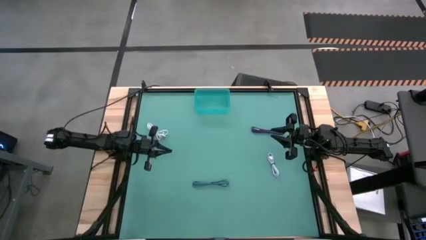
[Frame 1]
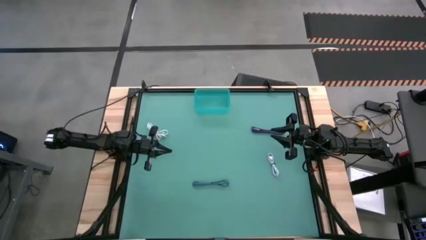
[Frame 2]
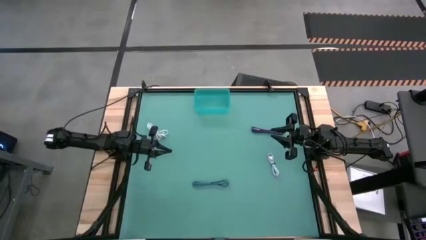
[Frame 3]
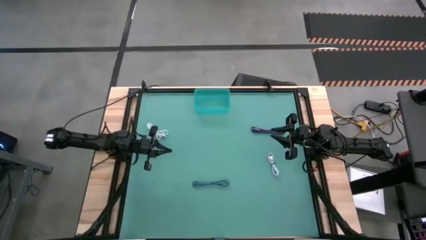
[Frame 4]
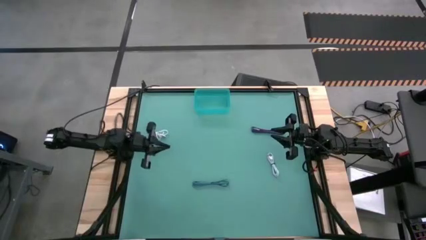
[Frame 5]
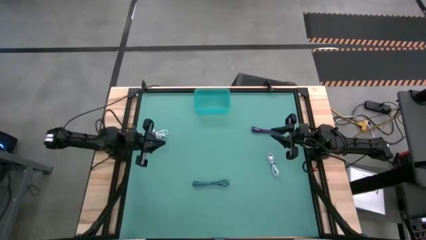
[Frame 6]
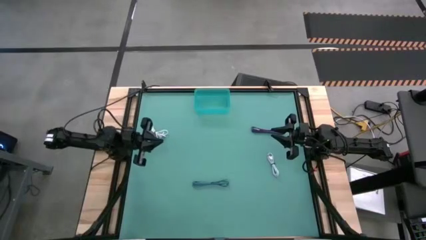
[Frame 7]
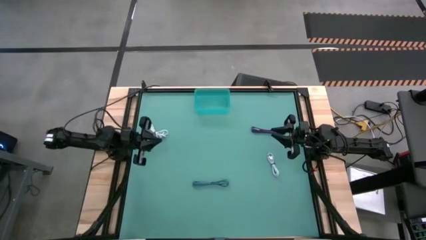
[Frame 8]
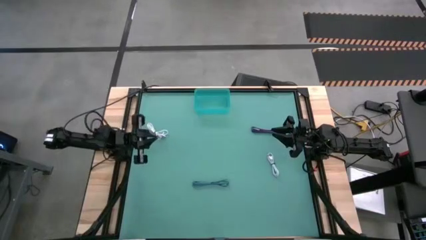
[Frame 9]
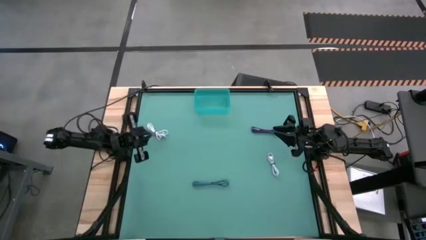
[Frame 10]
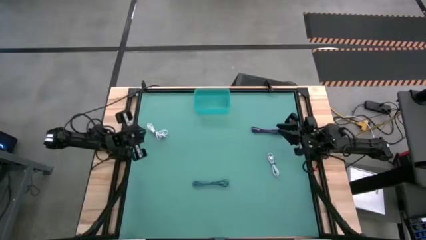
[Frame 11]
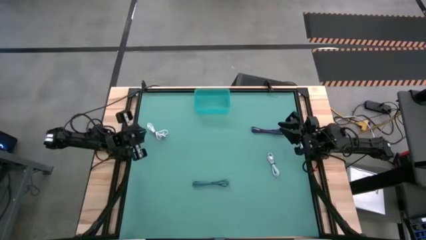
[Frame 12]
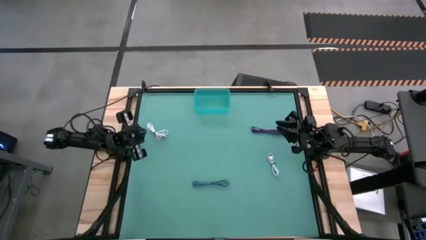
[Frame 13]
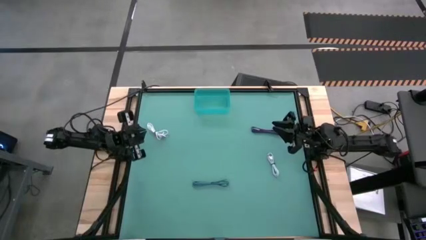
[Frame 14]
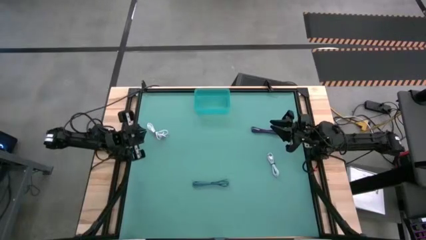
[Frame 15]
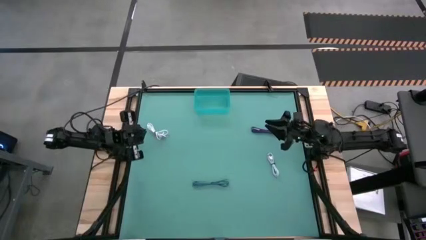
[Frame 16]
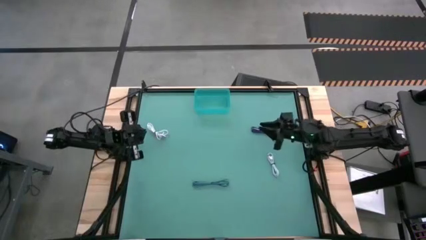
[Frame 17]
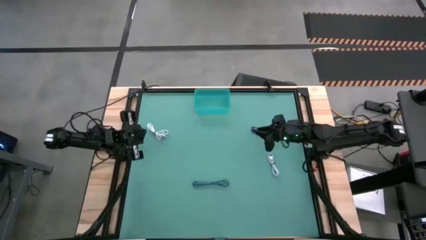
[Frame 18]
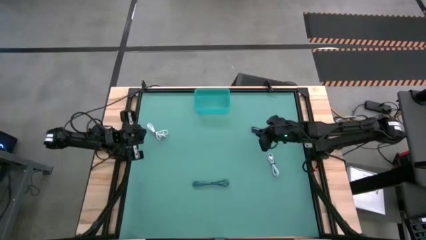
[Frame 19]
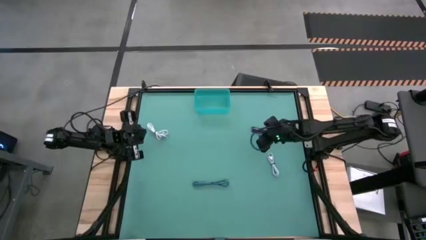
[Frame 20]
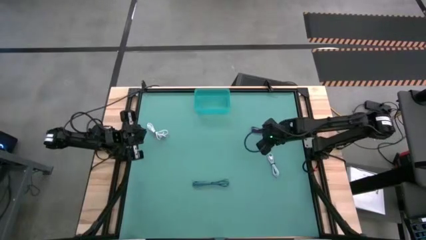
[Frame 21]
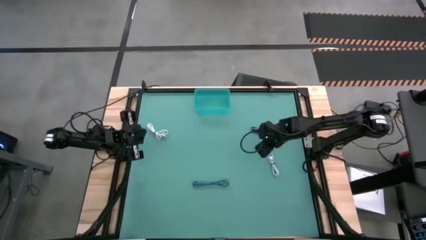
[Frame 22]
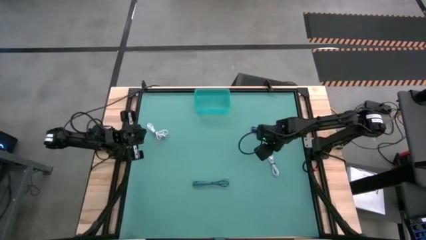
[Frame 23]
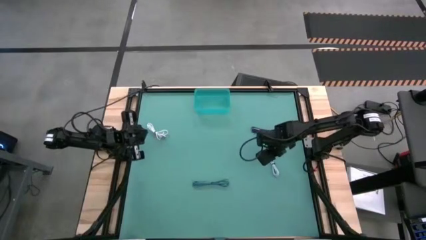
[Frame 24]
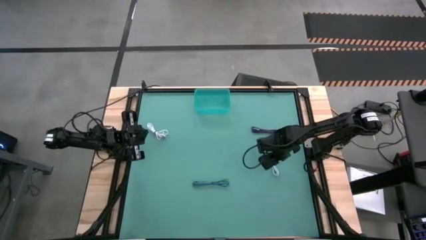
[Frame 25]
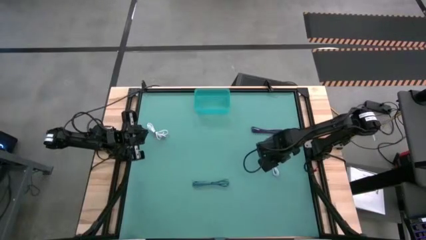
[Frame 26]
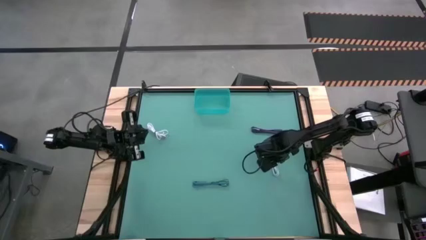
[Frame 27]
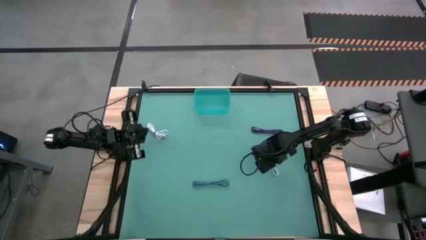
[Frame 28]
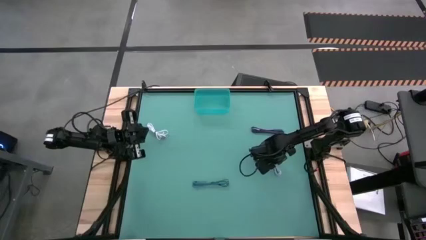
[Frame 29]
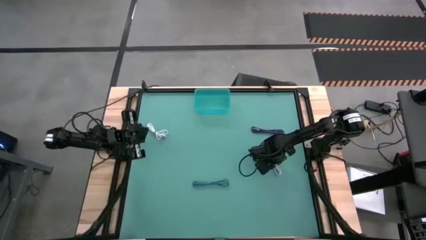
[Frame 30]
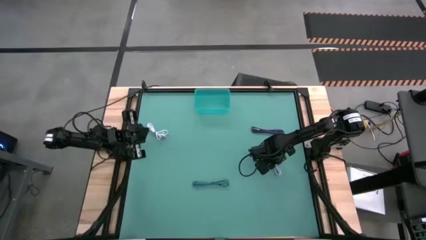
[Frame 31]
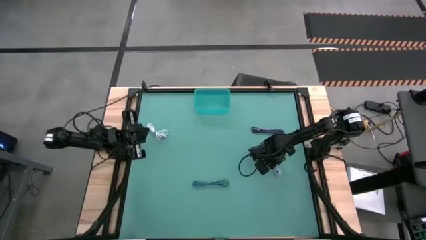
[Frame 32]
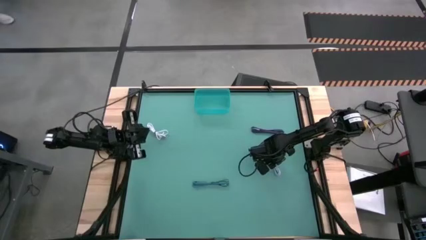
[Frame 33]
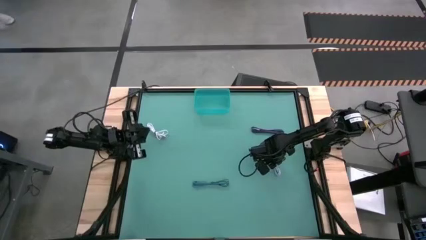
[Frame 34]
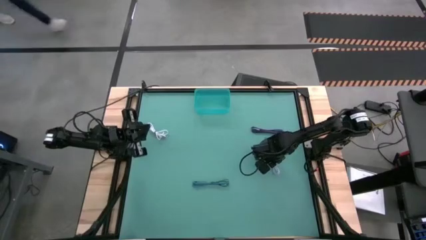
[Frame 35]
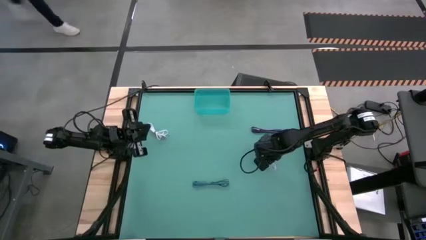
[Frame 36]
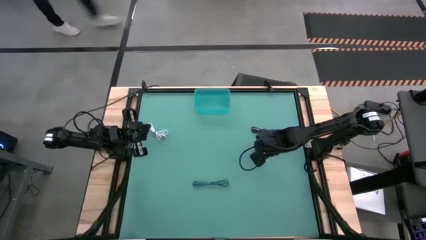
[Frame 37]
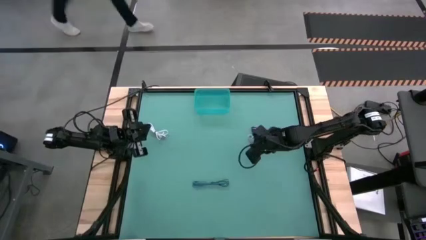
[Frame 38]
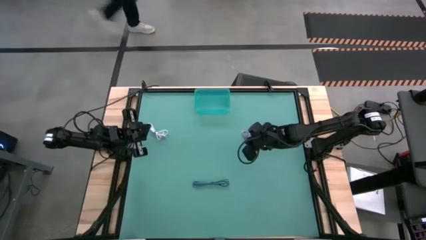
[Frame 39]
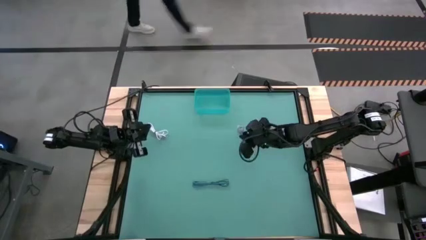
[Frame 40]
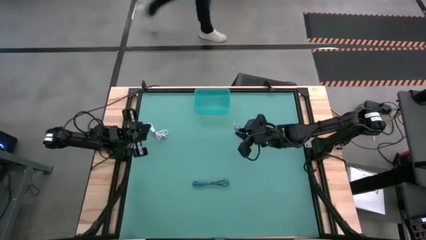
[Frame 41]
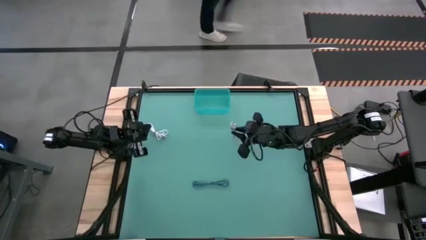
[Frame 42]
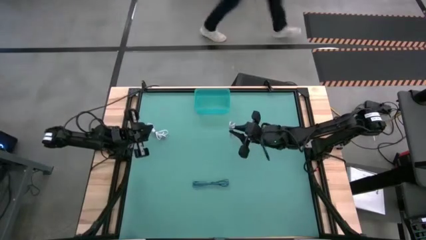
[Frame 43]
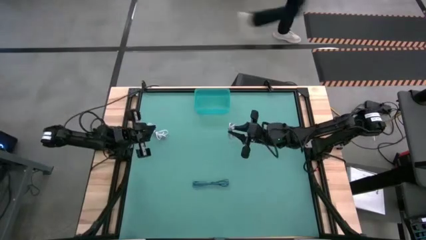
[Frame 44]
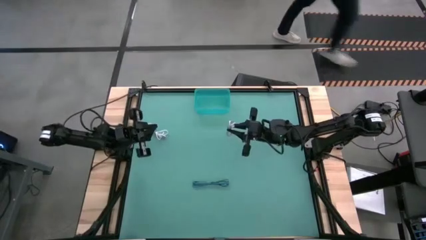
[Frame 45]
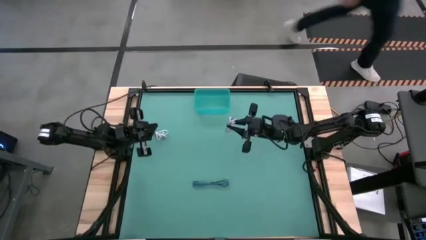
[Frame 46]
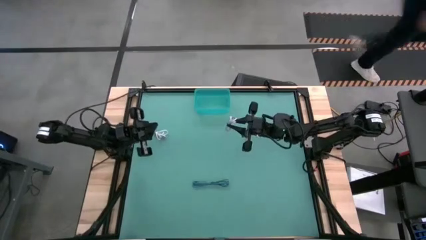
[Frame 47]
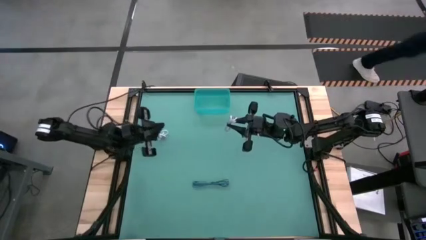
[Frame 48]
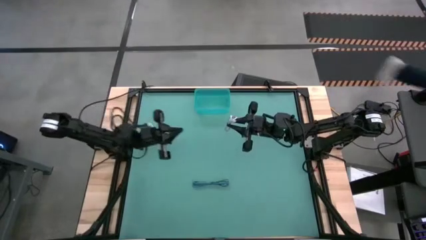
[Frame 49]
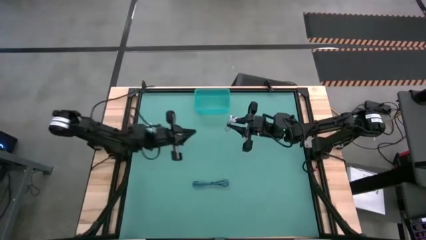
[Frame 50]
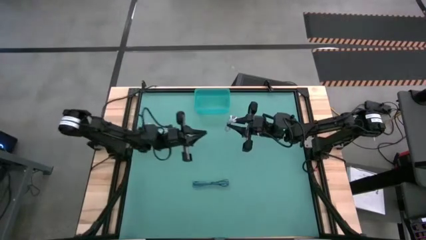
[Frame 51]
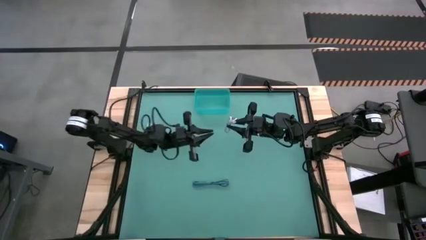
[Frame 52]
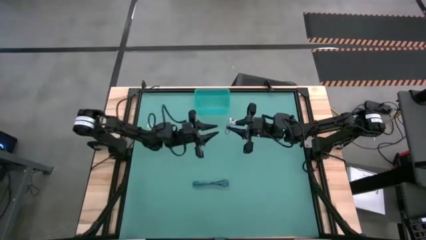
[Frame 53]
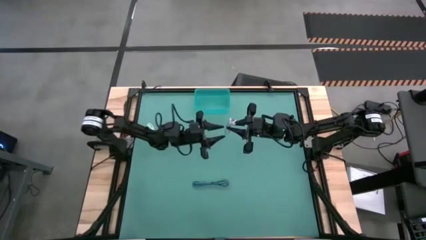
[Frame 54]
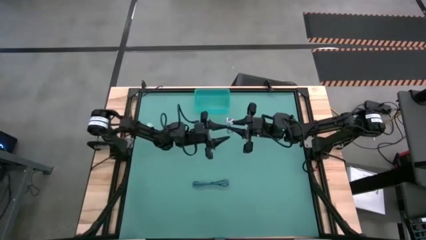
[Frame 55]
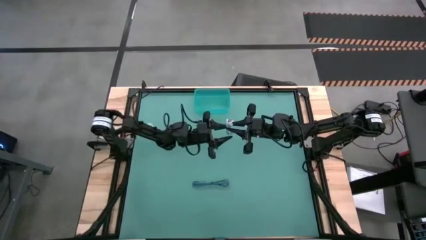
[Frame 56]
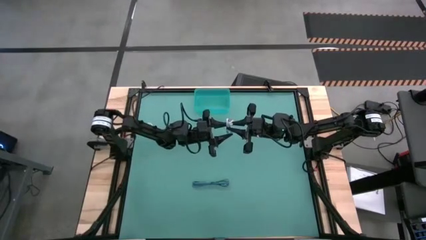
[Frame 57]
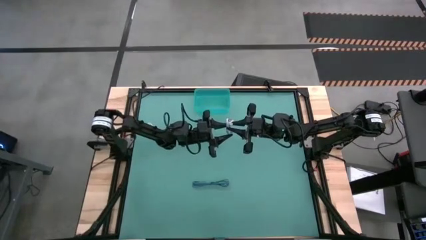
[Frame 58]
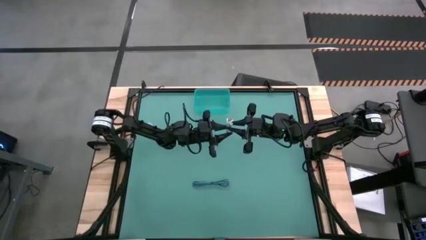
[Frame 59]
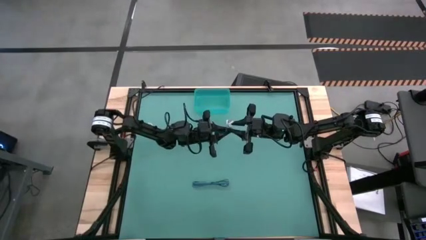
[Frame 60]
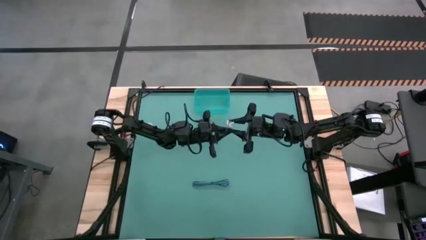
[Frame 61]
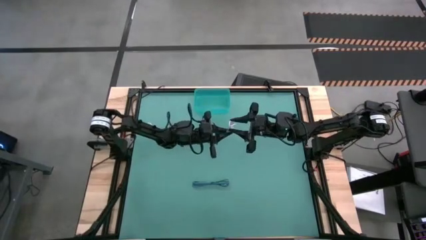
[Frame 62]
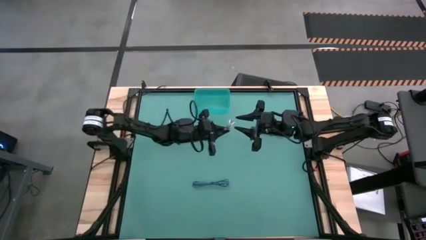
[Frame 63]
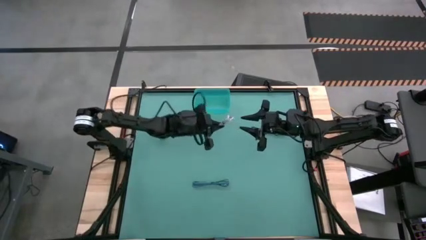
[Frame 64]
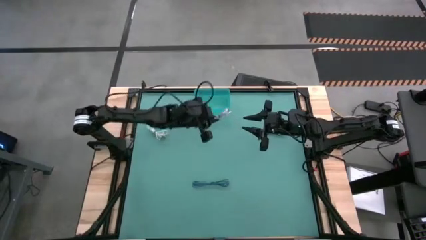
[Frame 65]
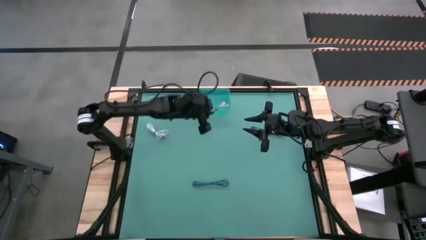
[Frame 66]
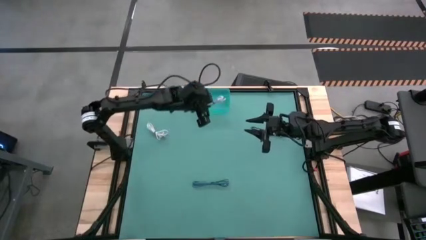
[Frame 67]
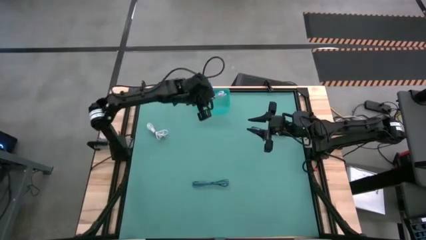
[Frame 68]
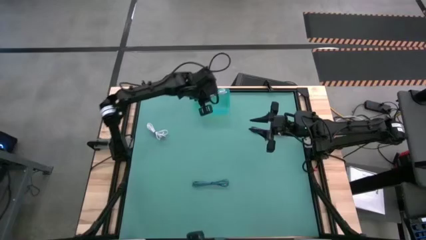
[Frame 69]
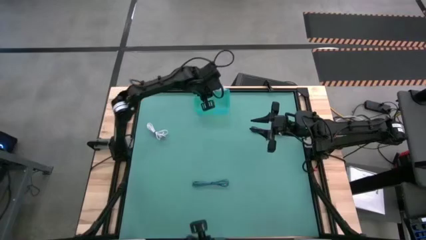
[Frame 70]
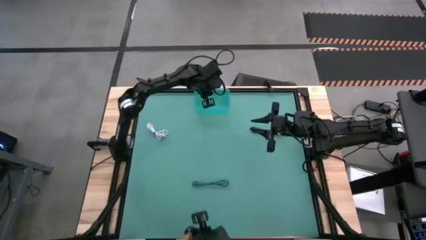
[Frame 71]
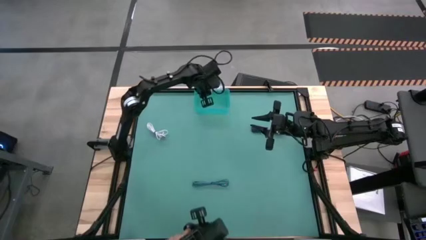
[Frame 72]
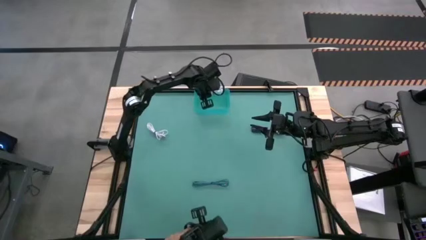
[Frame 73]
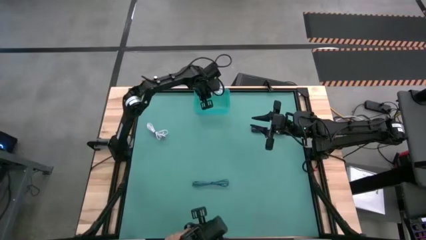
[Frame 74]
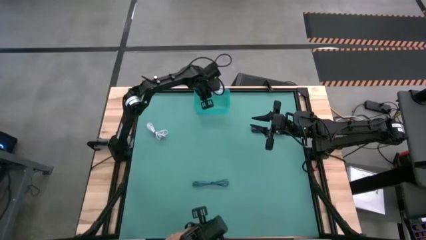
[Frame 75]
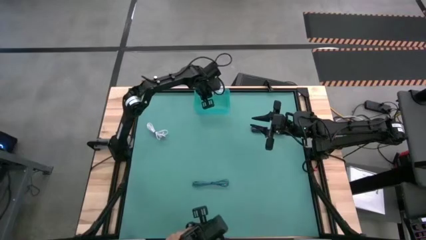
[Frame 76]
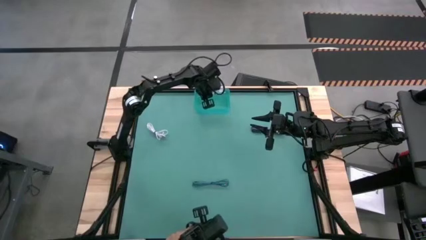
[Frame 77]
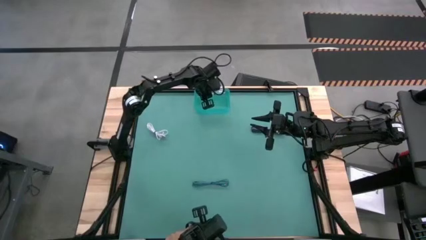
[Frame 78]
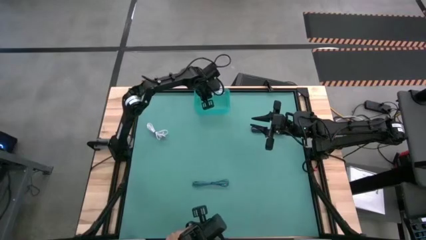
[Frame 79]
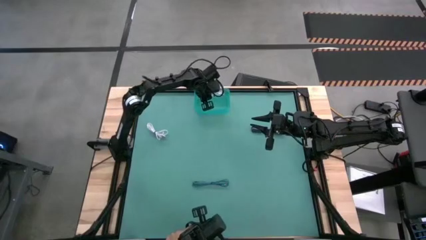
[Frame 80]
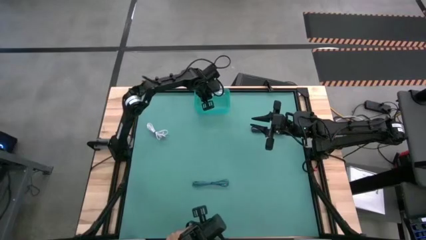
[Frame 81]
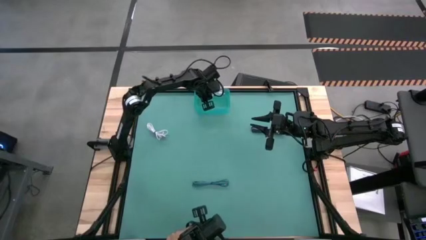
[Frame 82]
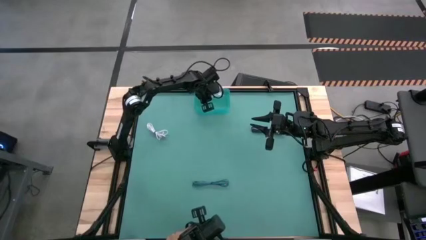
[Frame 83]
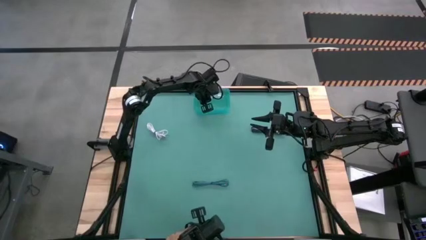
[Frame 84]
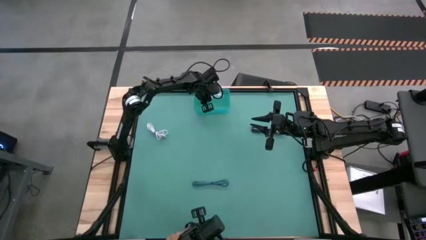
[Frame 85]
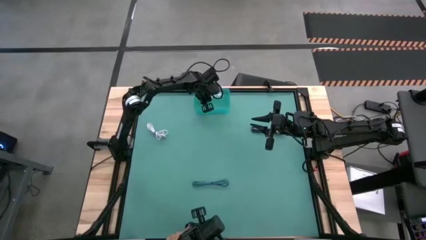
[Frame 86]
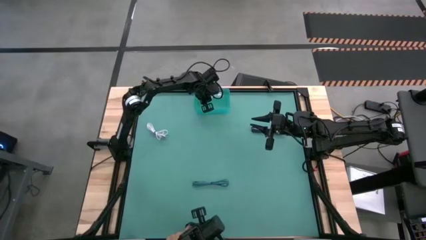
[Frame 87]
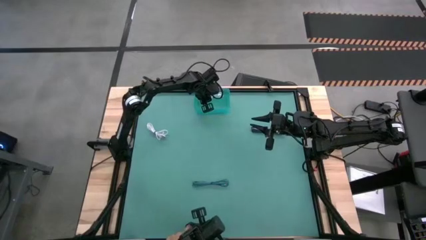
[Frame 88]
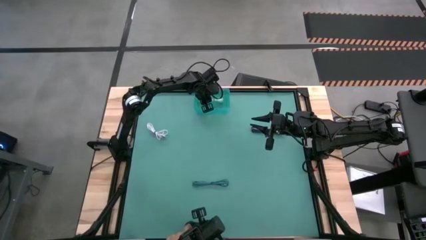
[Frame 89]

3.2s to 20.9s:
Task: Pick and place USB-C Cables
Put the light blue charger cable into the green bin
